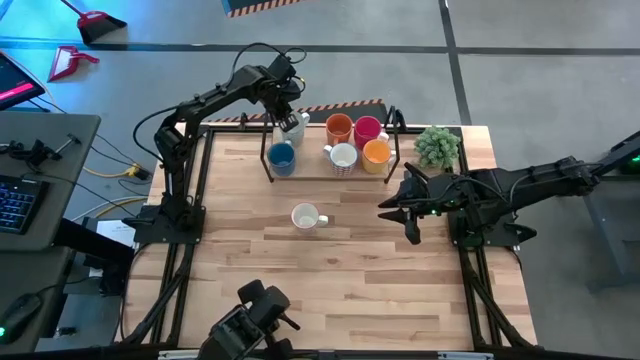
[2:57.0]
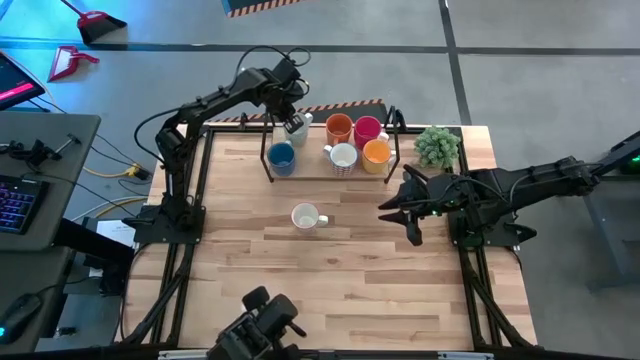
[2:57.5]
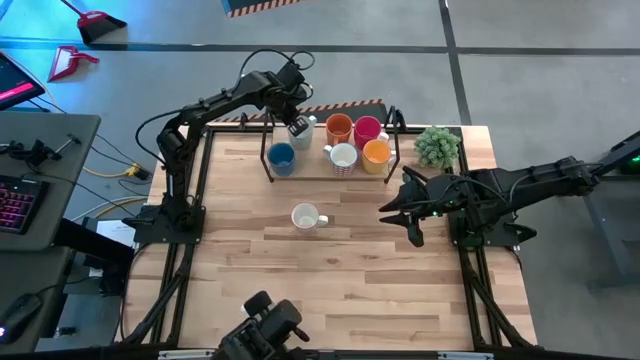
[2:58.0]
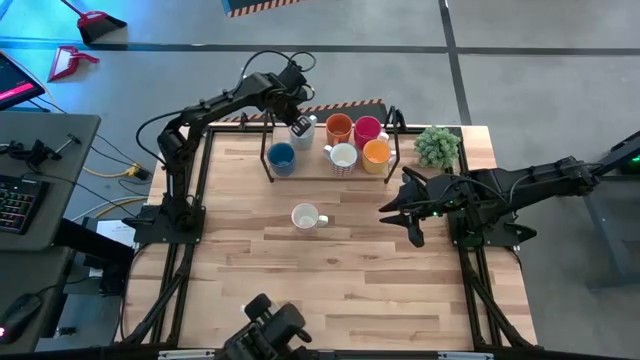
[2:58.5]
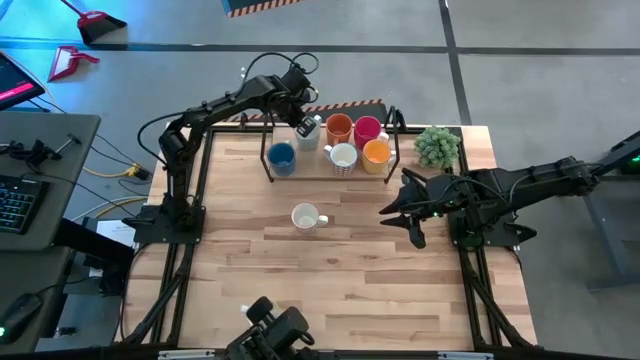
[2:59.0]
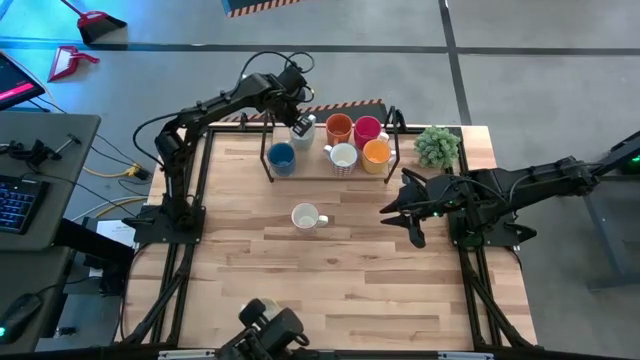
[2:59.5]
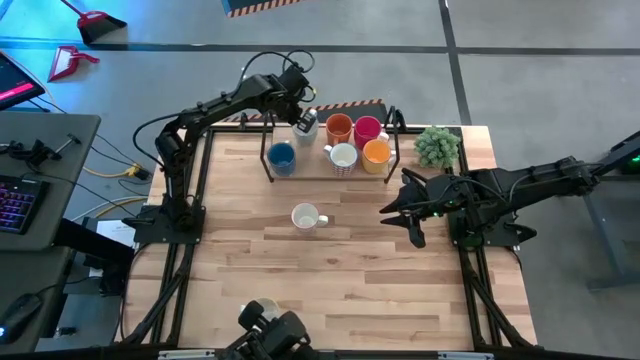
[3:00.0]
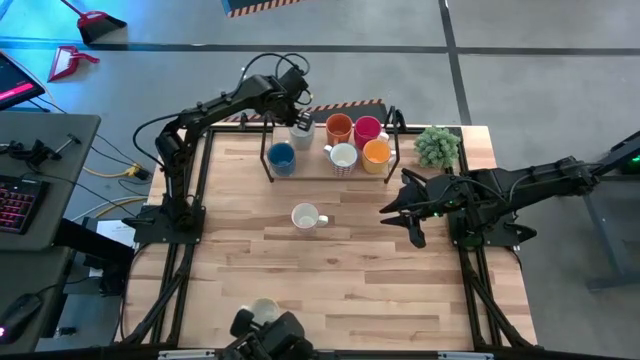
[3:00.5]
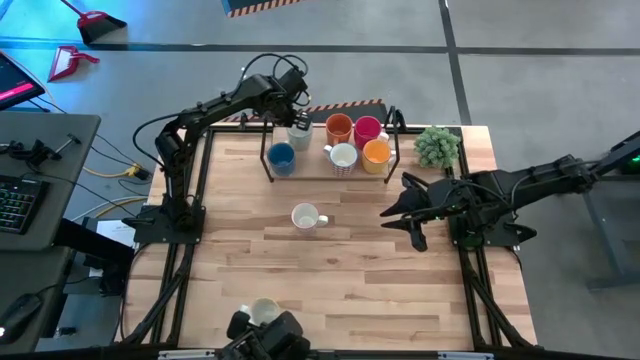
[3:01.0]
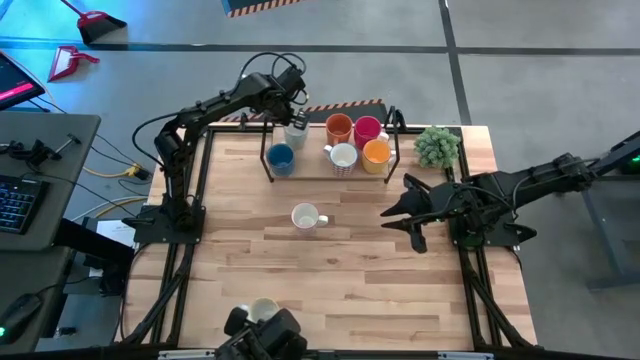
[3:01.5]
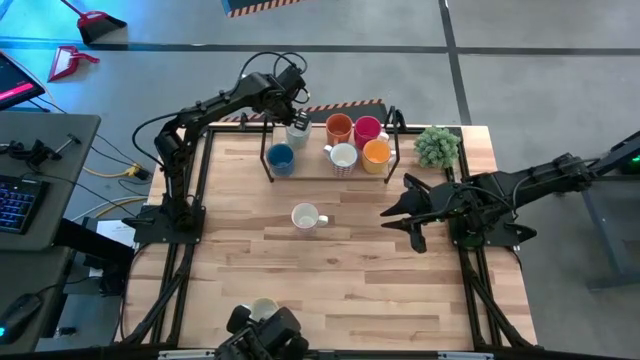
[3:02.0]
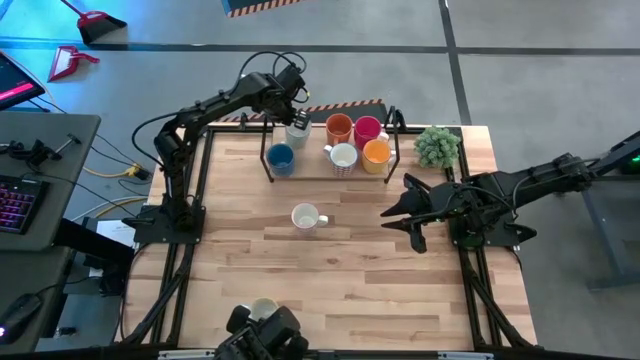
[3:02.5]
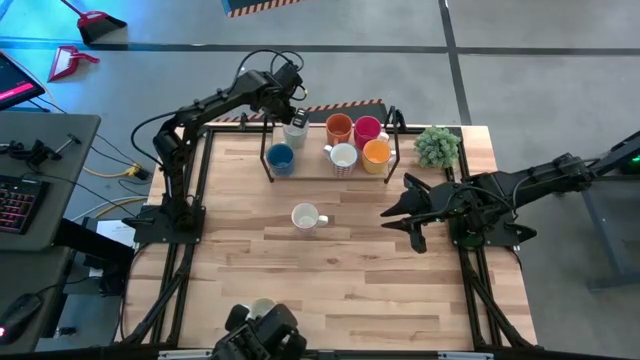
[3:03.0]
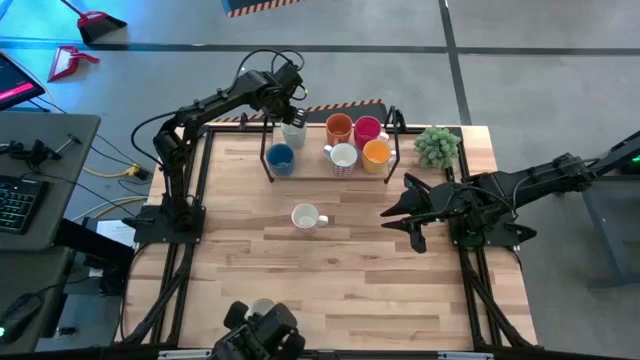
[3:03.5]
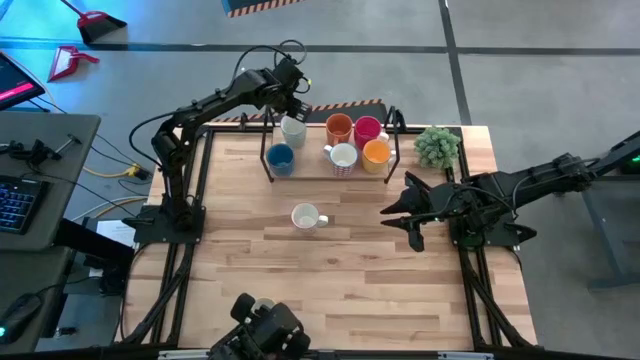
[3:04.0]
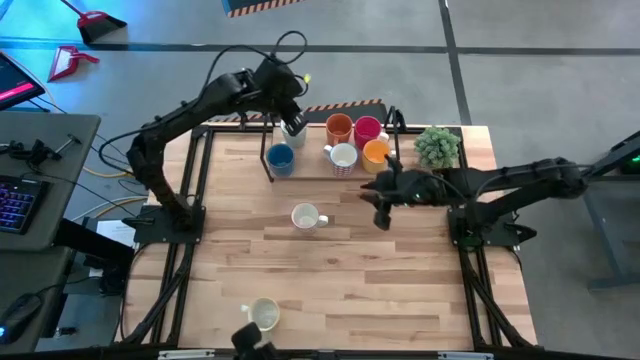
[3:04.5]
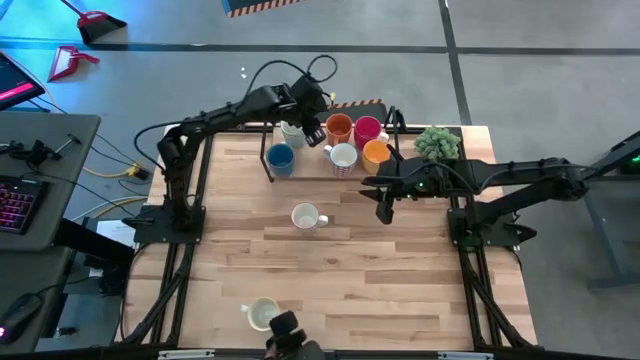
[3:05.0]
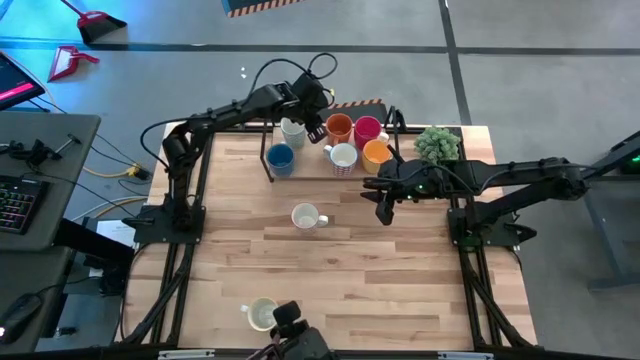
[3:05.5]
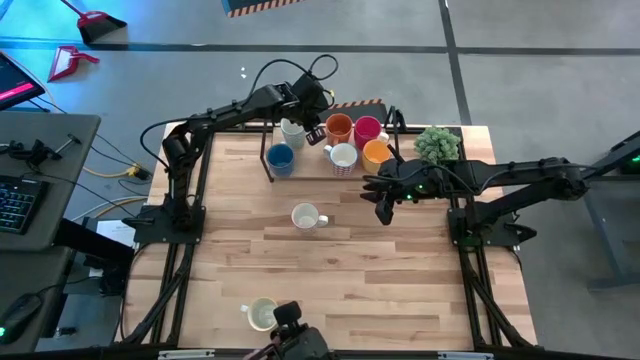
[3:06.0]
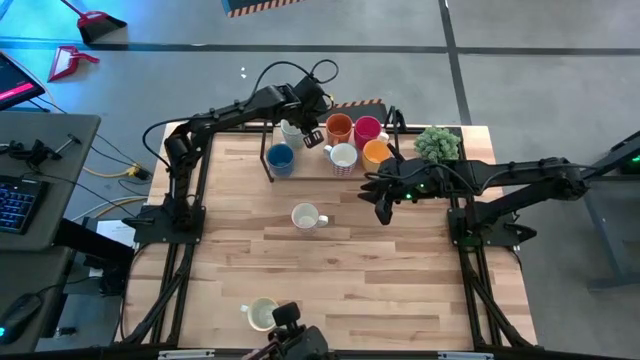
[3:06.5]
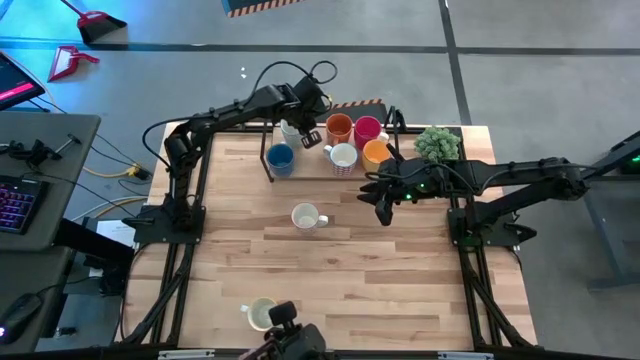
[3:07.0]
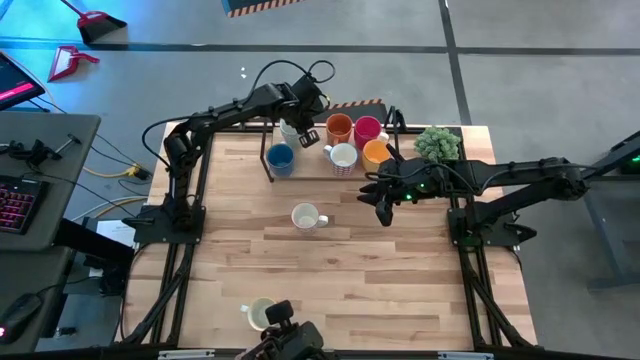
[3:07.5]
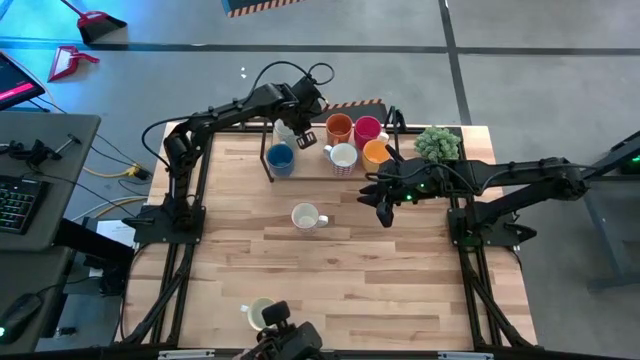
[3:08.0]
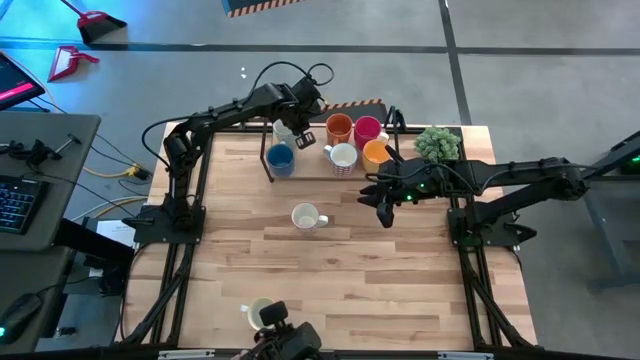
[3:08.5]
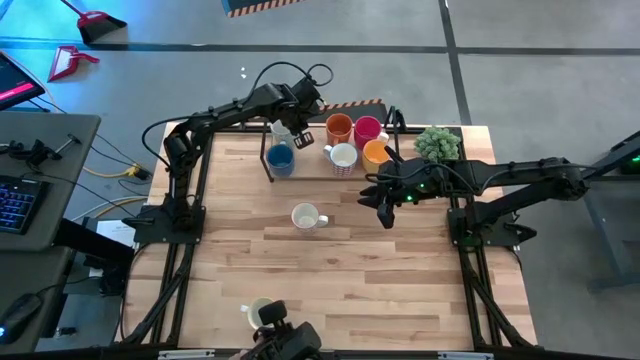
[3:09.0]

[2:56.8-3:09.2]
Task: Place coffee mugs
Adjust the white blue mug on the shelf

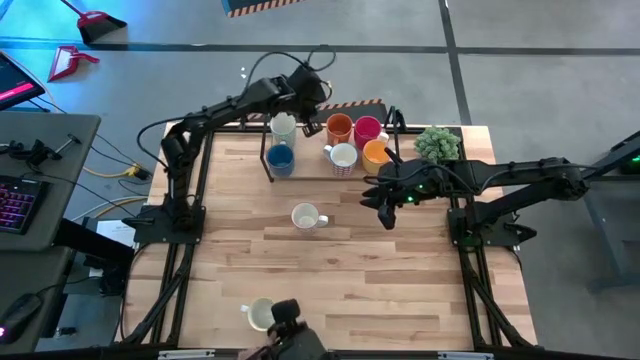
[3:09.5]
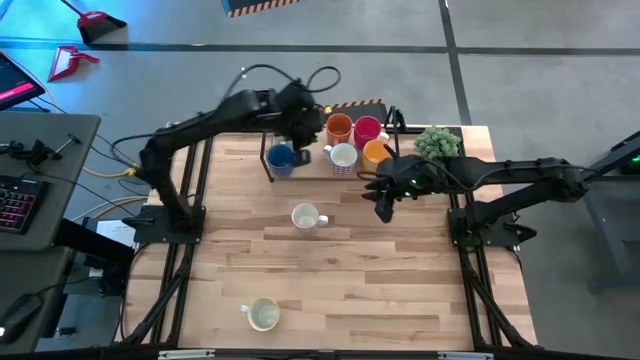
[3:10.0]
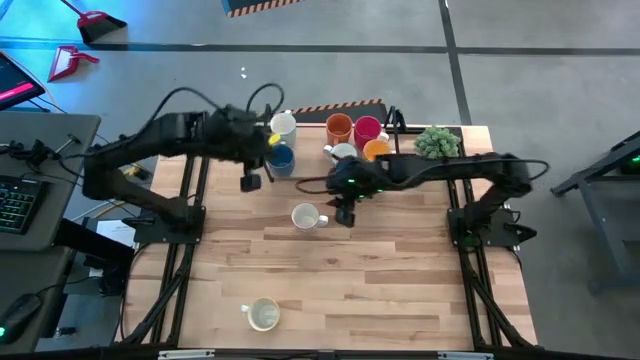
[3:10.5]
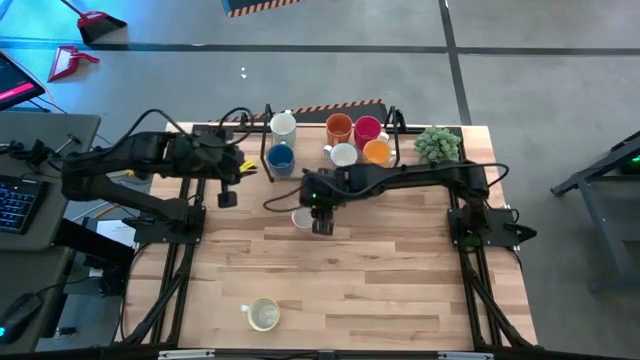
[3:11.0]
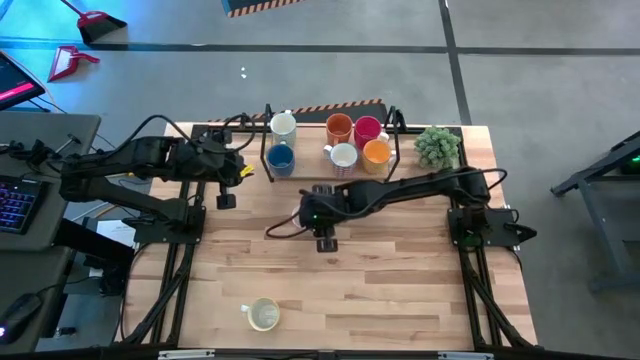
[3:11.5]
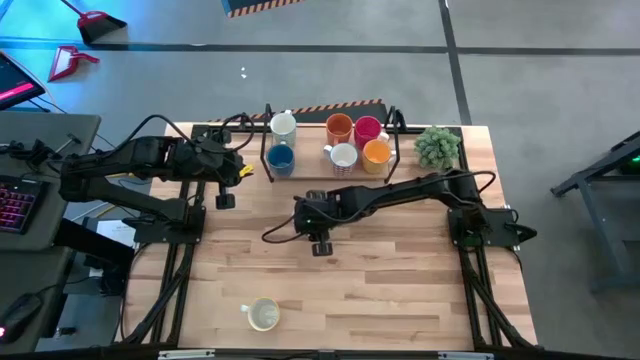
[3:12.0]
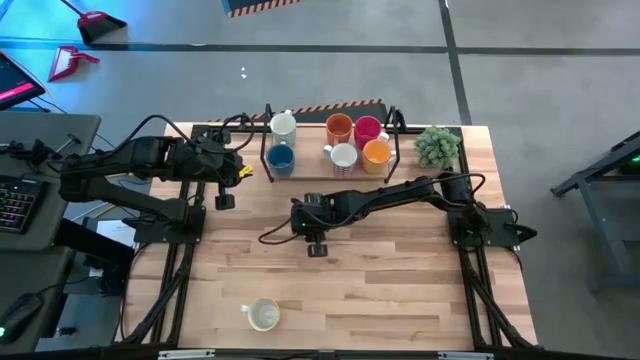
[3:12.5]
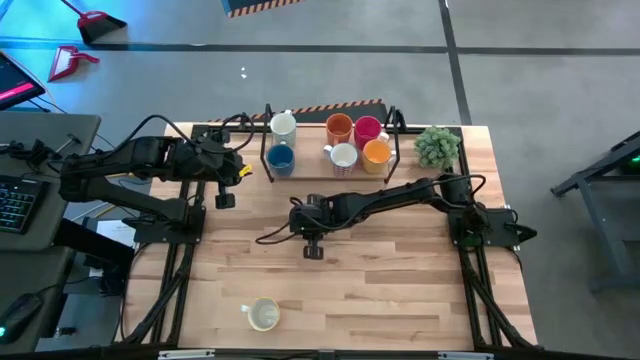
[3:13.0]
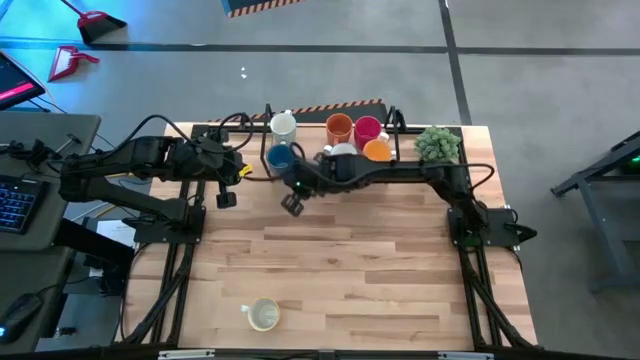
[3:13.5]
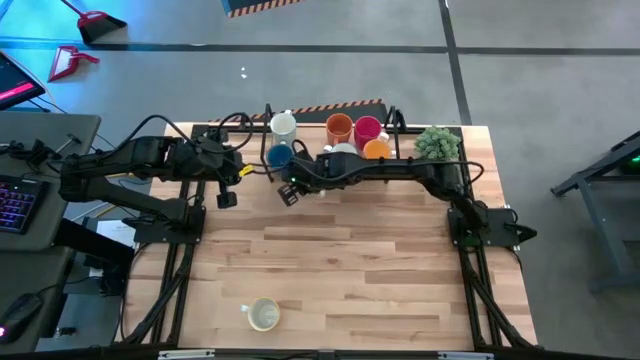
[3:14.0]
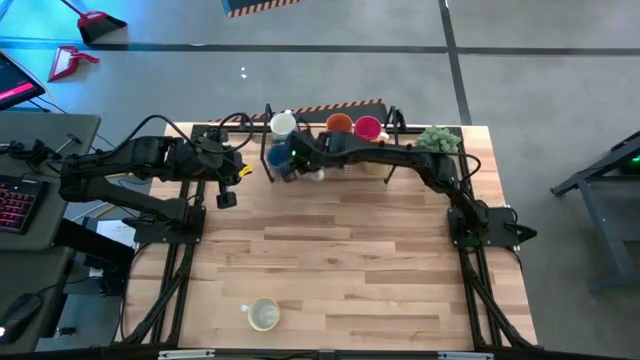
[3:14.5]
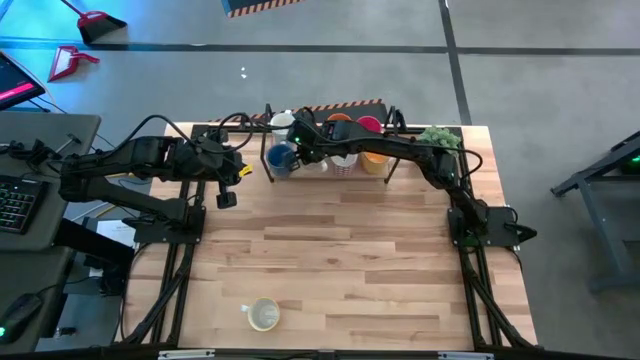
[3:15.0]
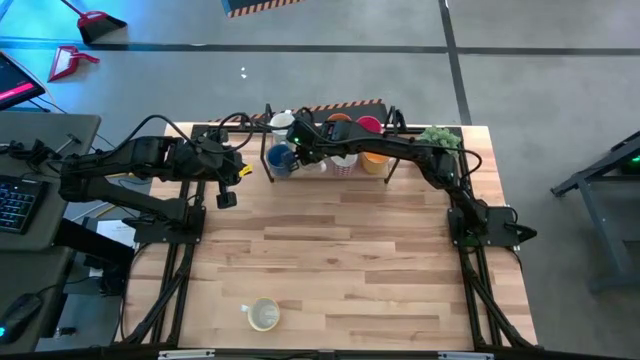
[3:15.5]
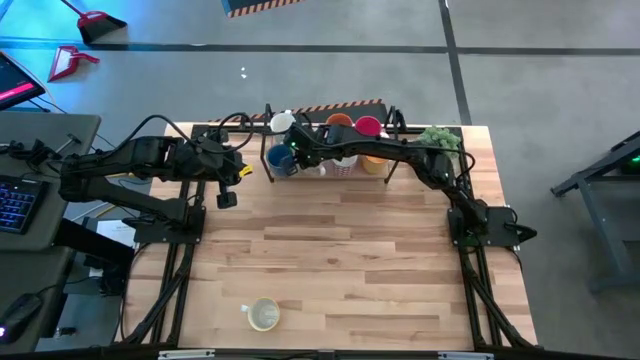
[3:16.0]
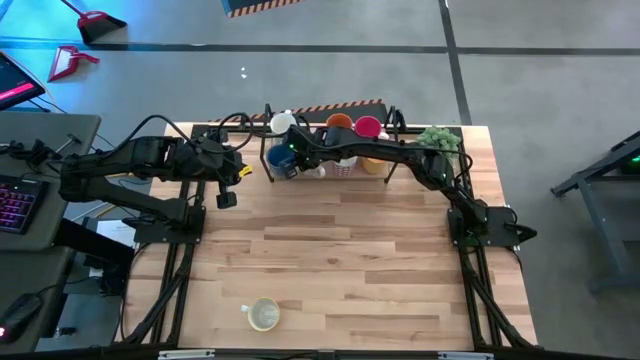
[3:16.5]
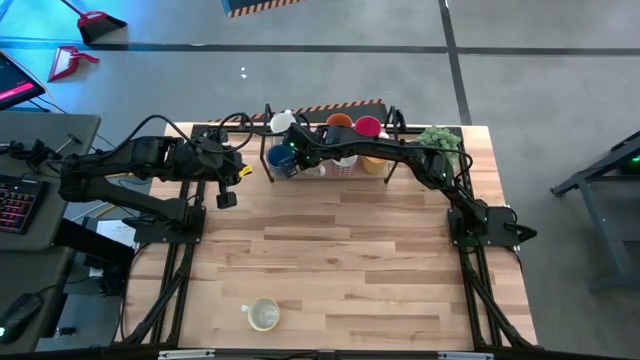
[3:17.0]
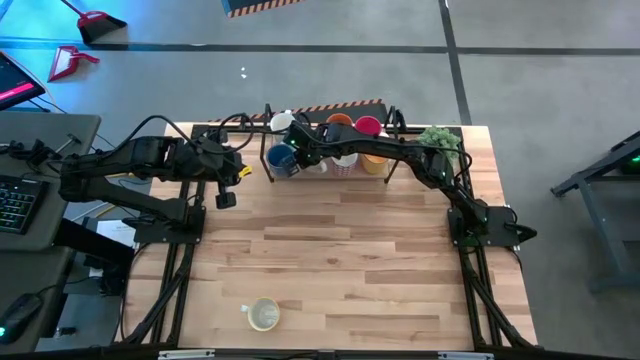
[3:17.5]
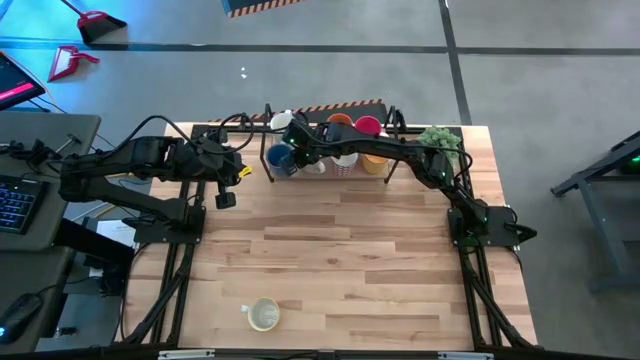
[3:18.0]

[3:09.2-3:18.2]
Put the white gray mug on the shelf
